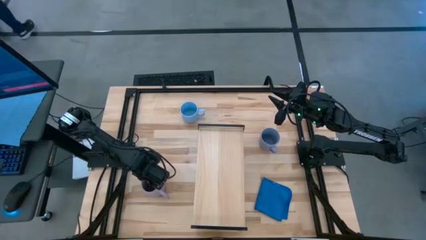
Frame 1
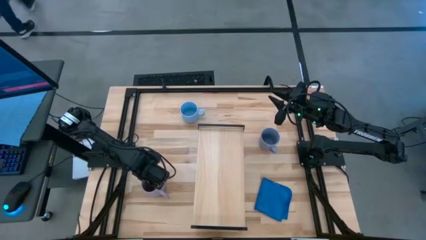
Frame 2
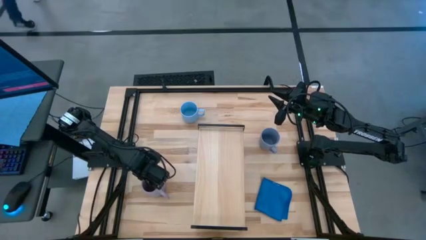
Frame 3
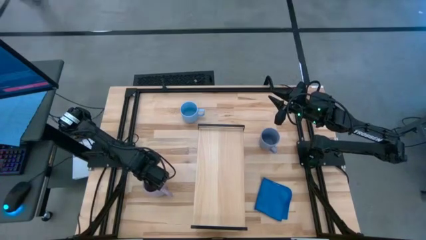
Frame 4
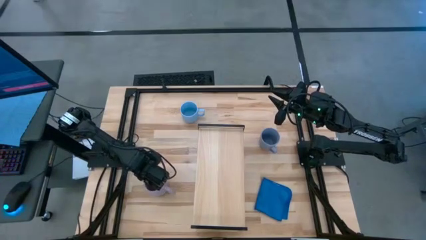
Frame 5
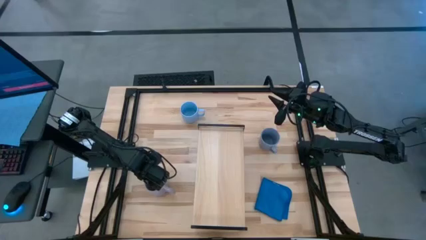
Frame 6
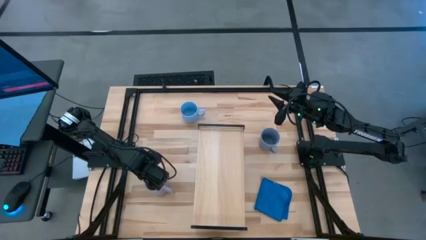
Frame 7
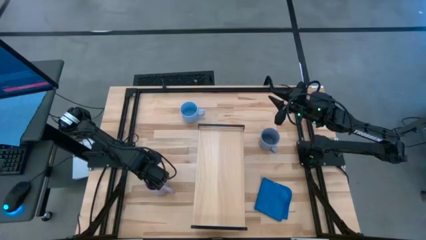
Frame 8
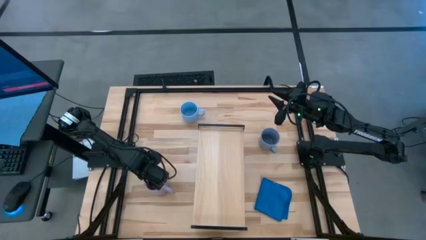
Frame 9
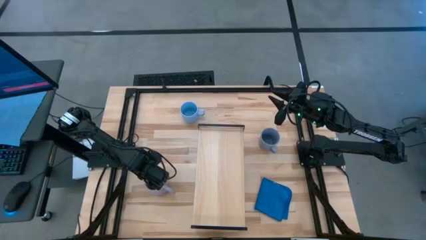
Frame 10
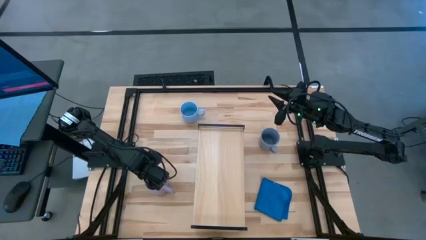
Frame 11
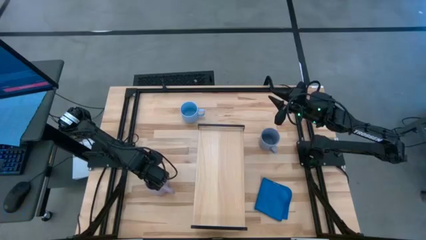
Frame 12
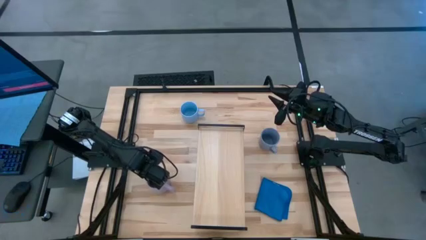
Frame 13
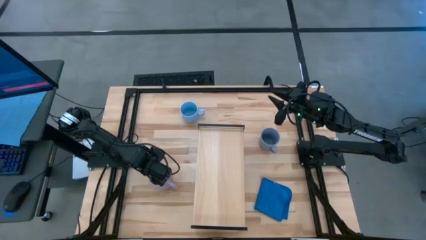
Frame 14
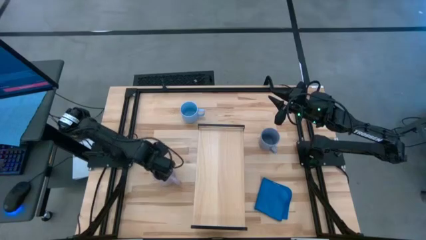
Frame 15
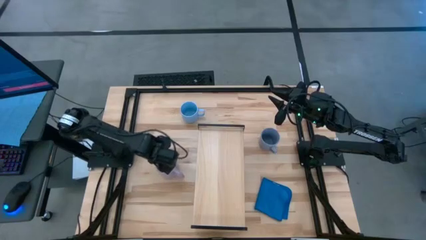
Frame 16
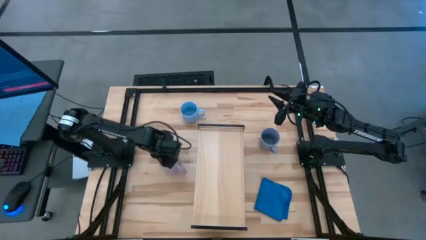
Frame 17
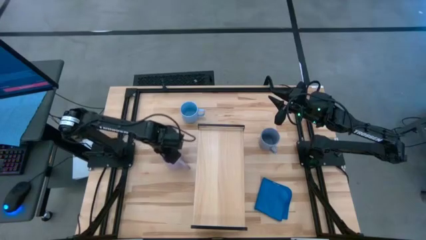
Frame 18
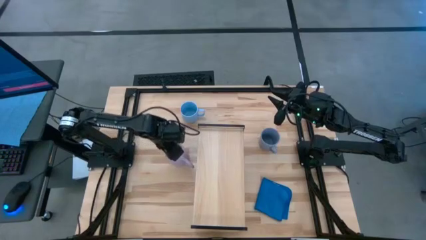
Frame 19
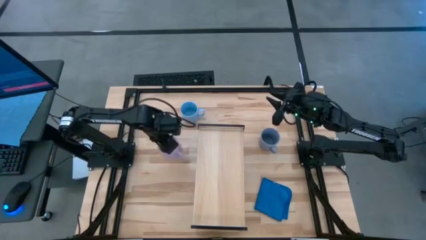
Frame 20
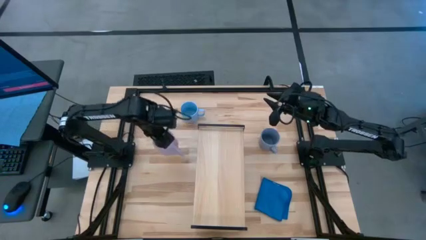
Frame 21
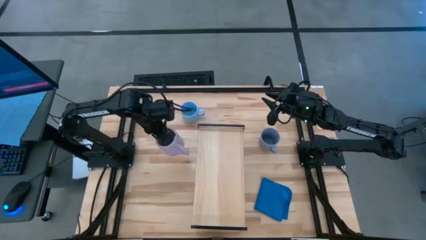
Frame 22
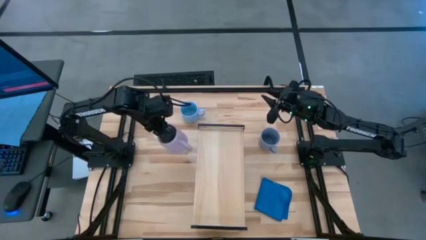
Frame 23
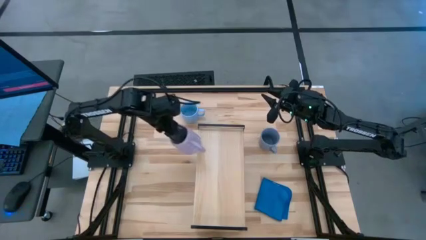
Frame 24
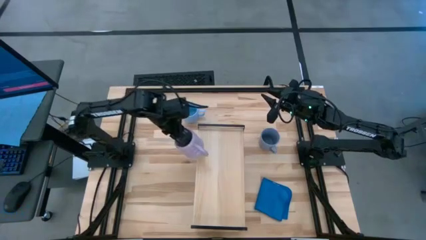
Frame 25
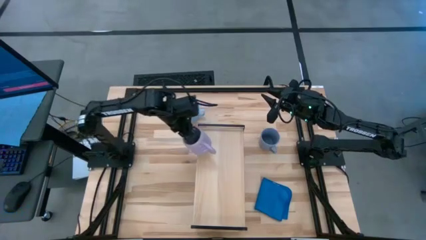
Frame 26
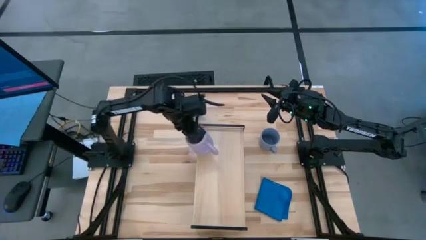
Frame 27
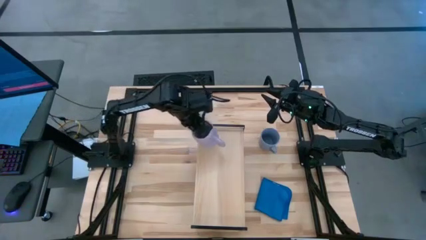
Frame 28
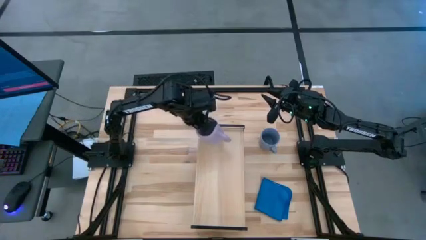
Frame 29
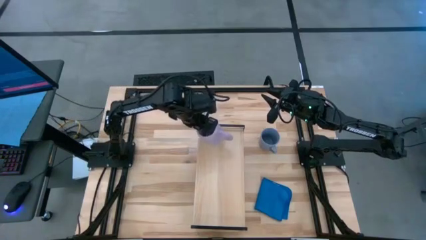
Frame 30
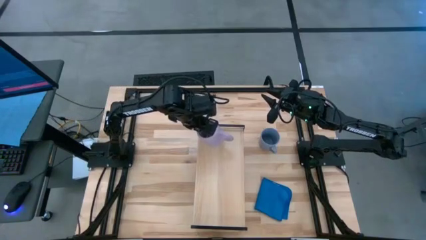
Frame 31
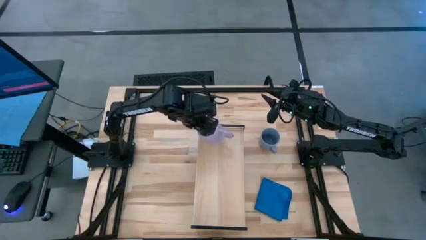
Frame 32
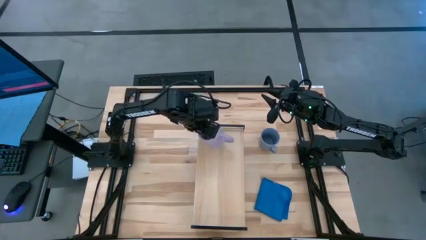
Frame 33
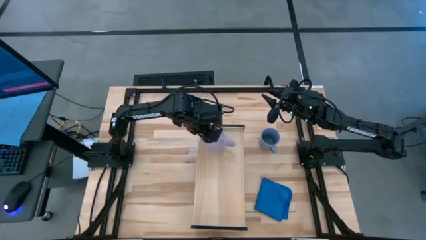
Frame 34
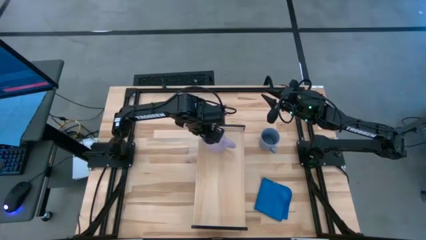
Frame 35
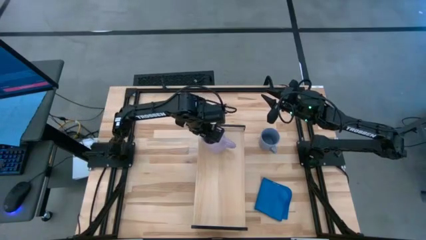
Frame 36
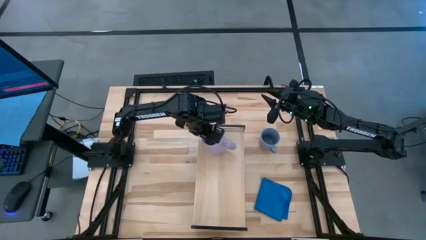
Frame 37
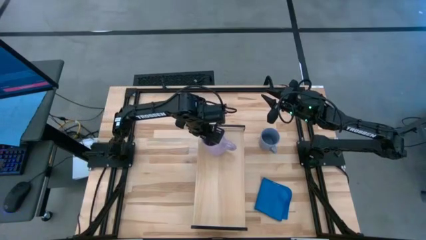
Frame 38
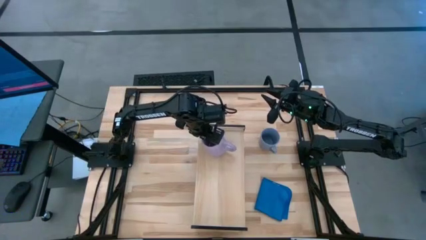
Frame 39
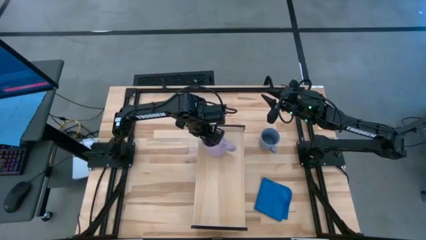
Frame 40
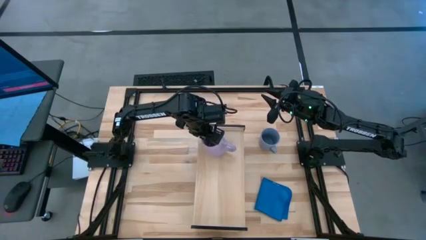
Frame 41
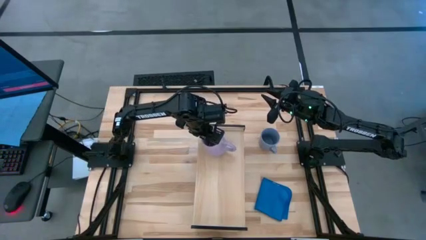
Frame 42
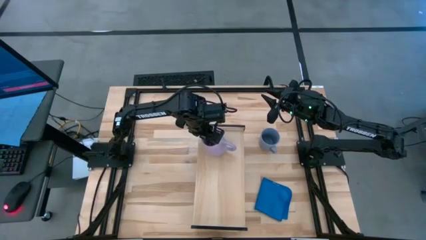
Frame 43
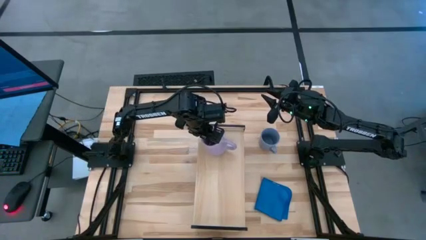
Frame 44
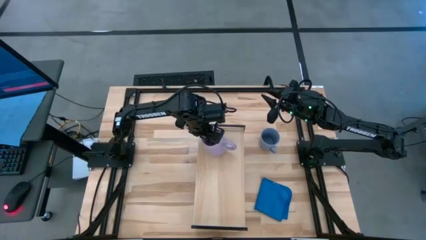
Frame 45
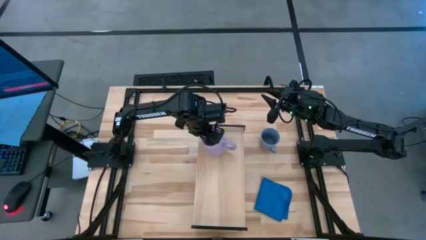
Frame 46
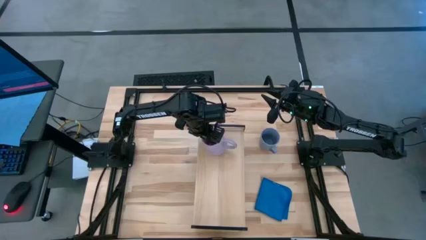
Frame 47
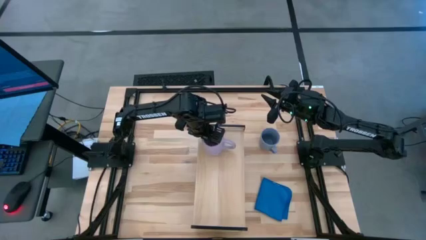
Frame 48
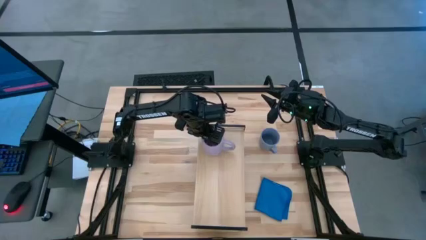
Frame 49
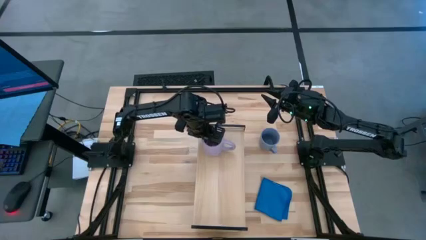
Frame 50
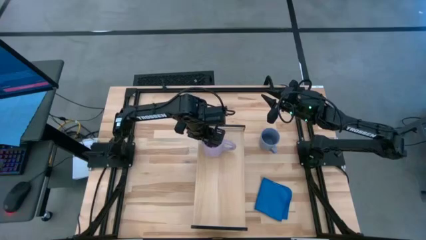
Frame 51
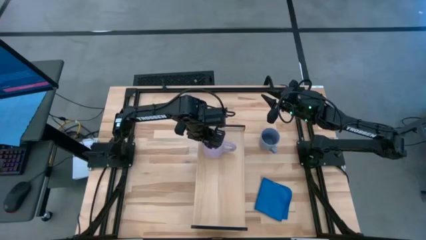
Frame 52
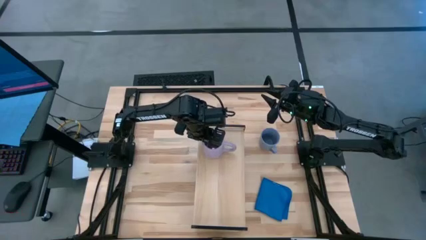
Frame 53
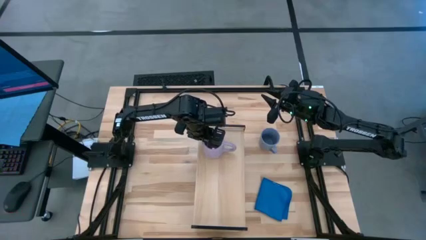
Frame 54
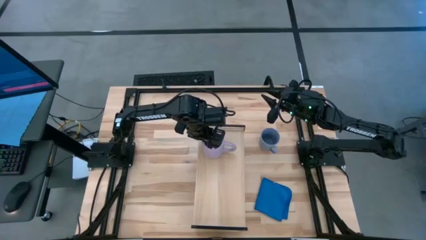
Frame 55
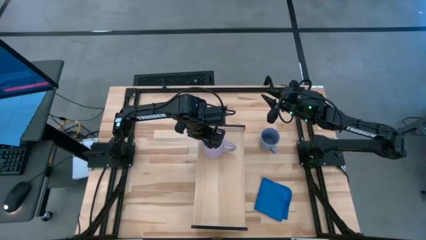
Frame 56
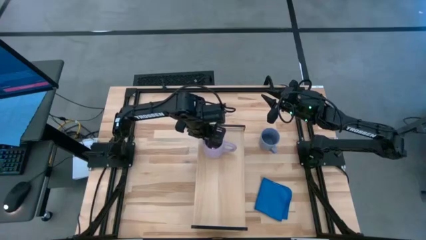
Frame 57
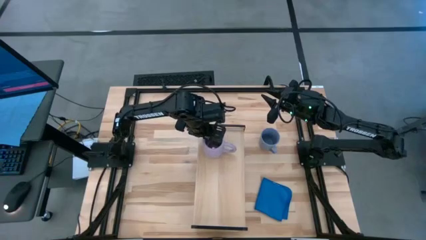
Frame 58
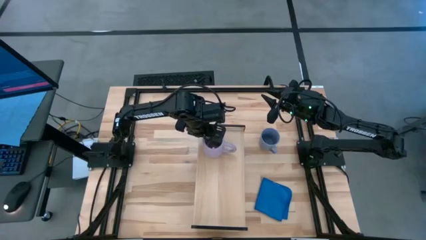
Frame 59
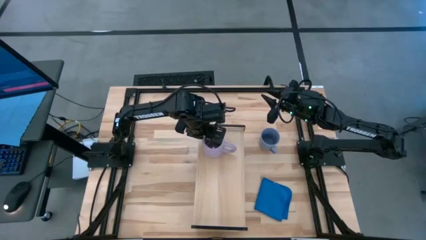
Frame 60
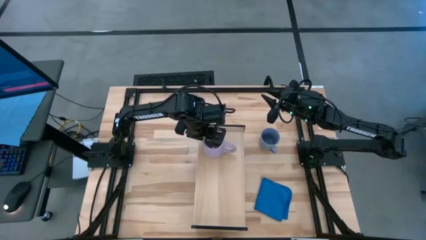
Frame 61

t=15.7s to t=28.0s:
Task: Stack small to large cups/mugs on shelf
Put the purple mug on the shelf
